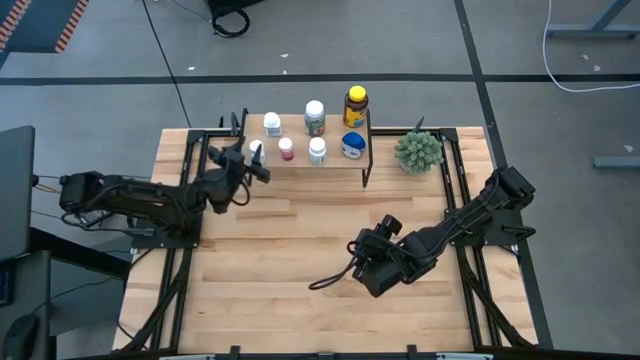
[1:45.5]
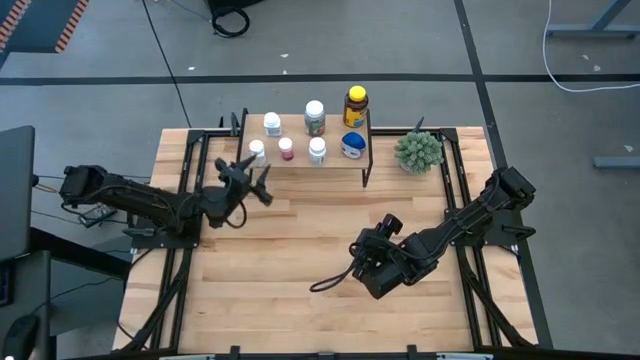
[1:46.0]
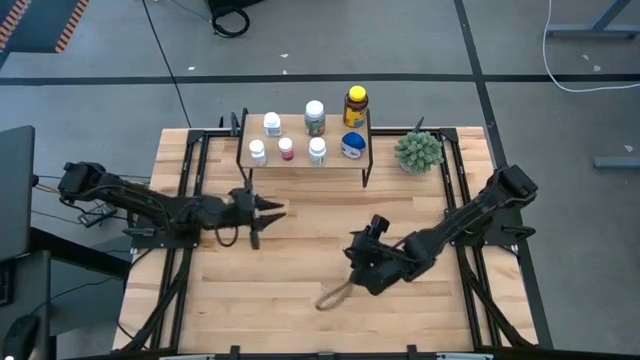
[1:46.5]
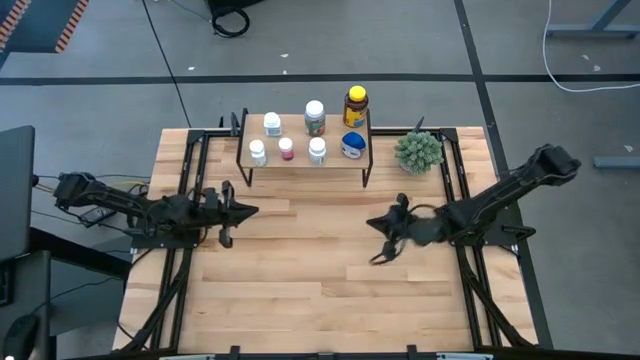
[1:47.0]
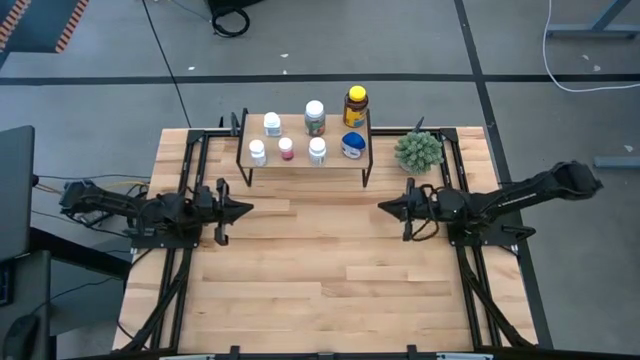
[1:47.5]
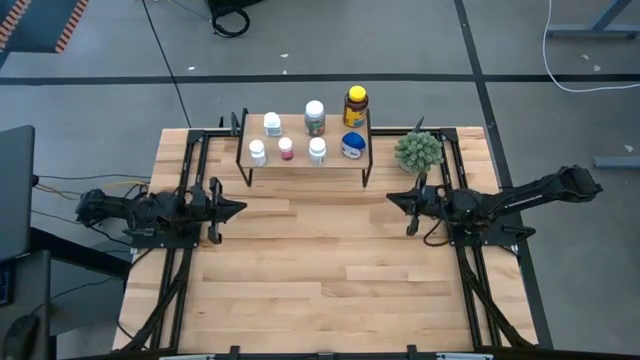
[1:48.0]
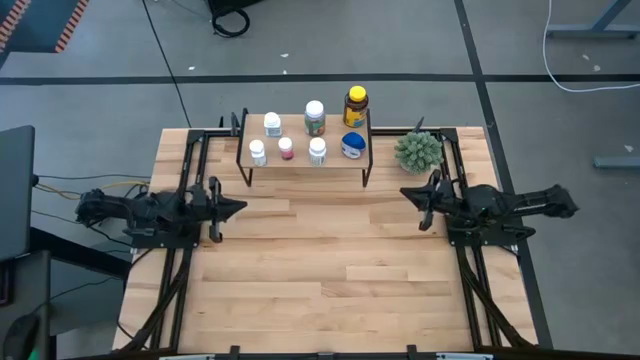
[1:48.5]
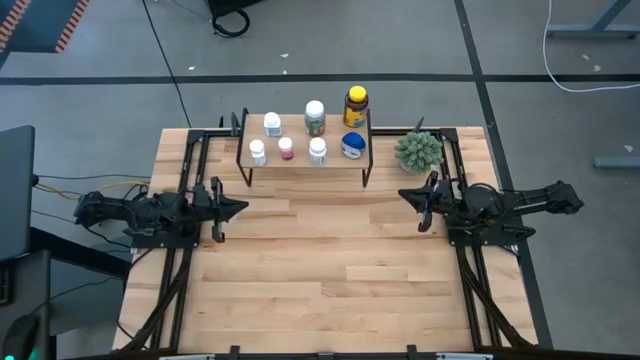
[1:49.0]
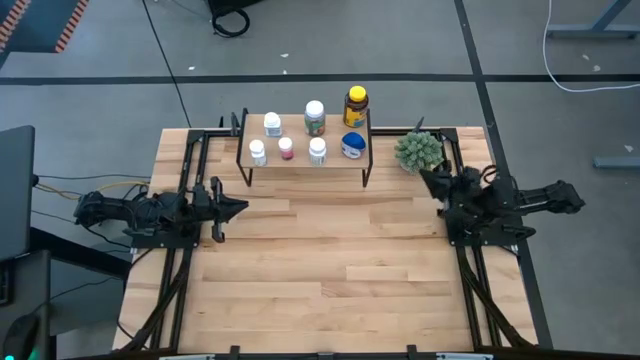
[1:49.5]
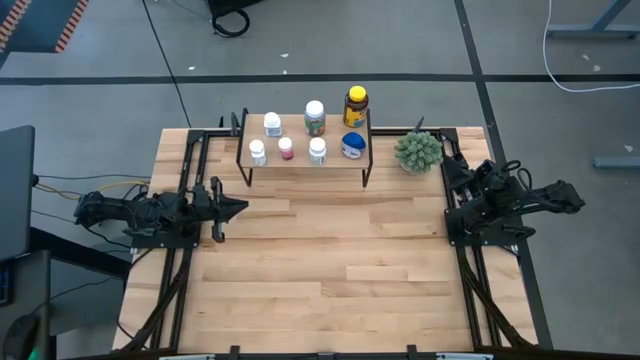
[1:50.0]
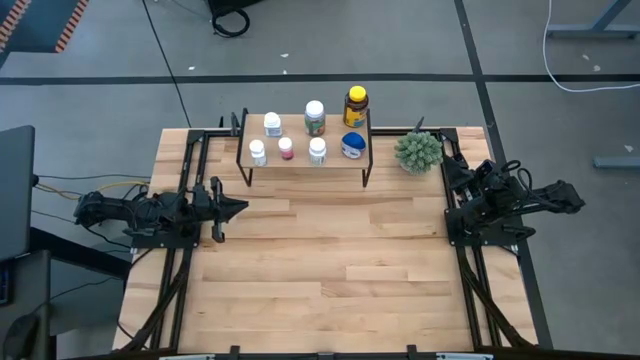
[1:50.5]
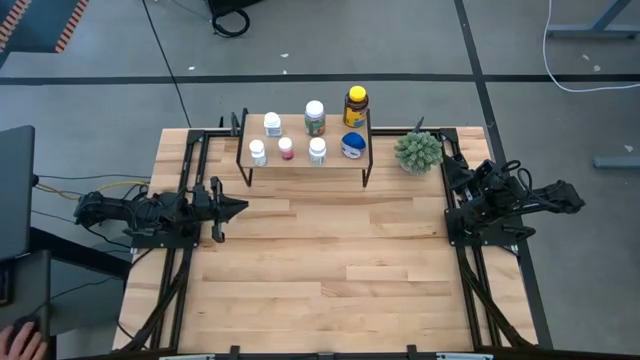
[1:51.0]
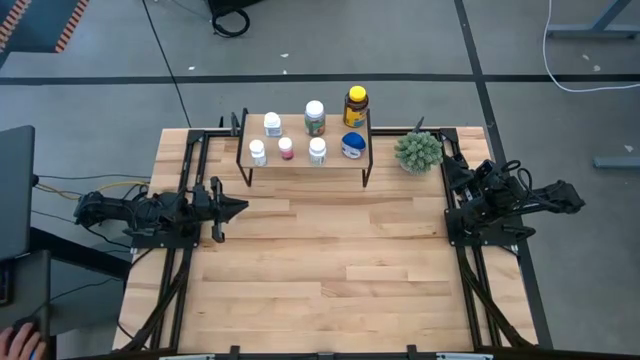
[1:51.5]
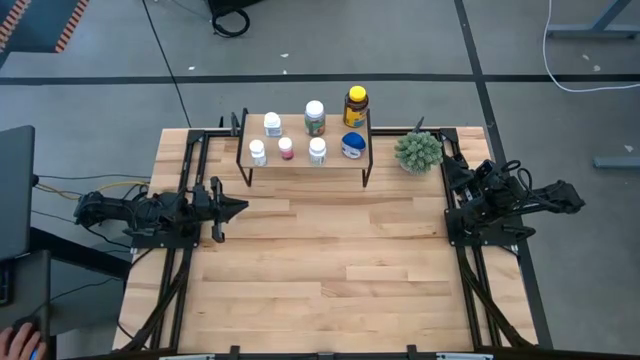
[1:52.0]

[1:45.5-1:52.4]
Task: Pick and place medicine bottles onto shelf by color
Return to Home Position

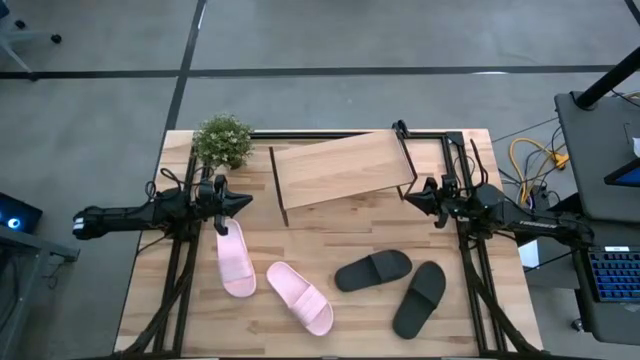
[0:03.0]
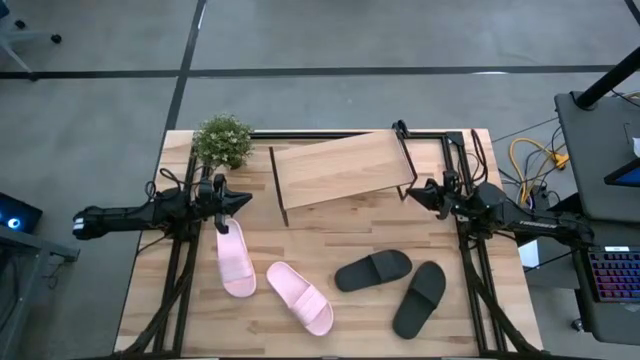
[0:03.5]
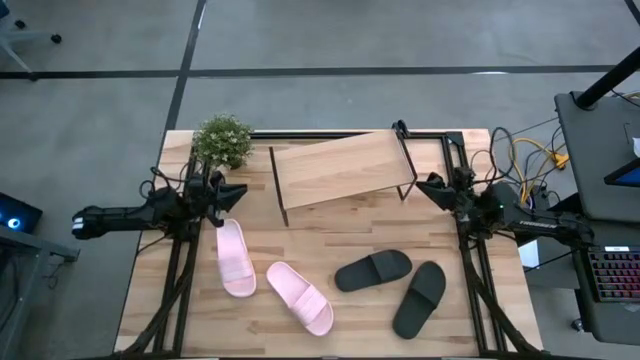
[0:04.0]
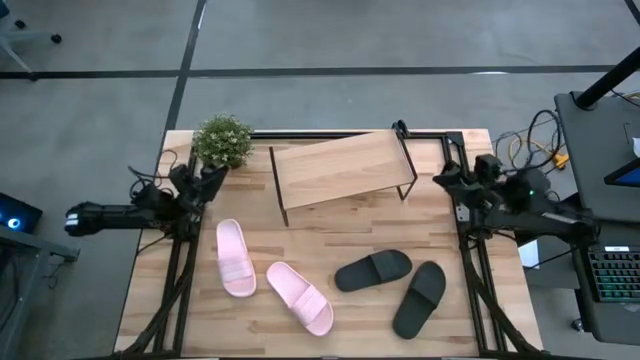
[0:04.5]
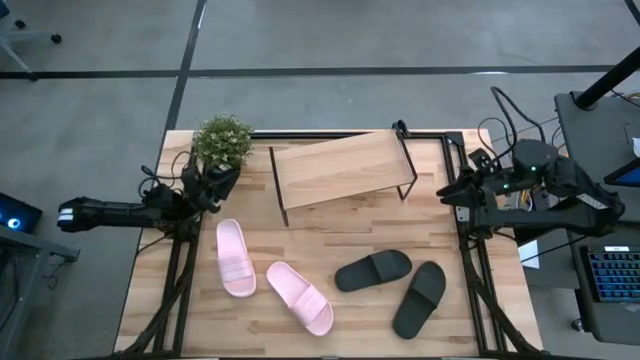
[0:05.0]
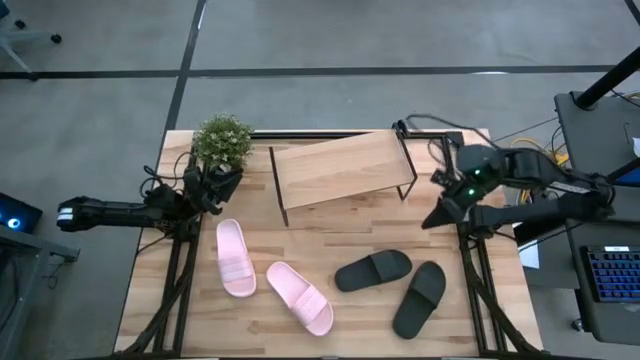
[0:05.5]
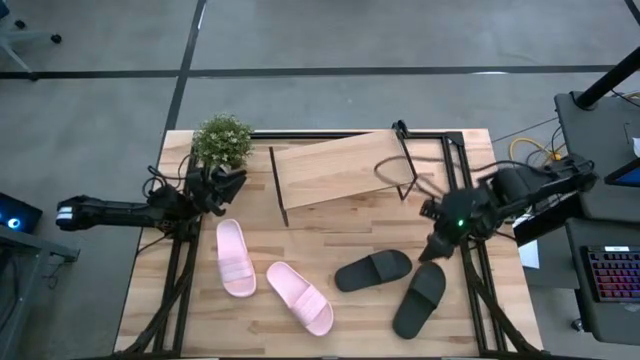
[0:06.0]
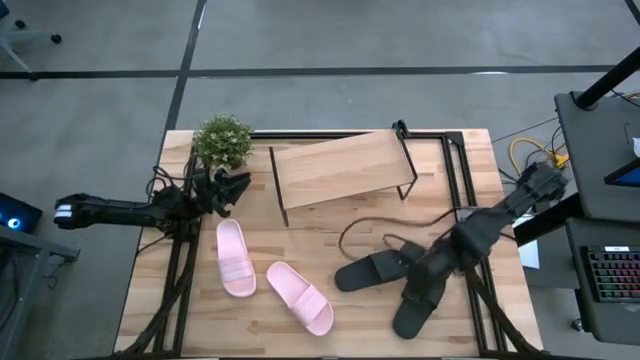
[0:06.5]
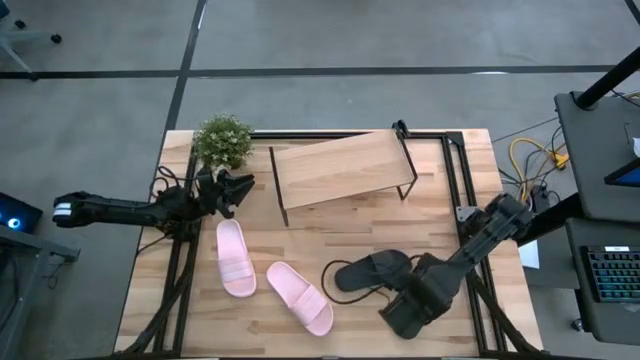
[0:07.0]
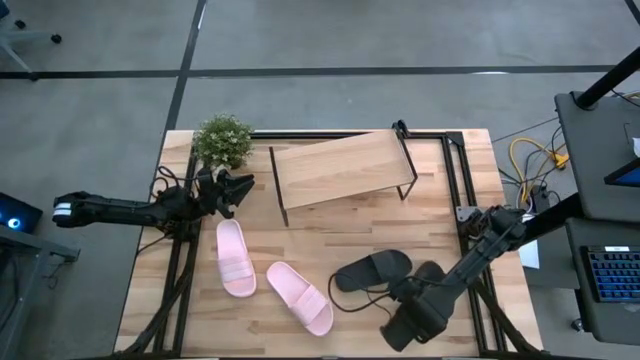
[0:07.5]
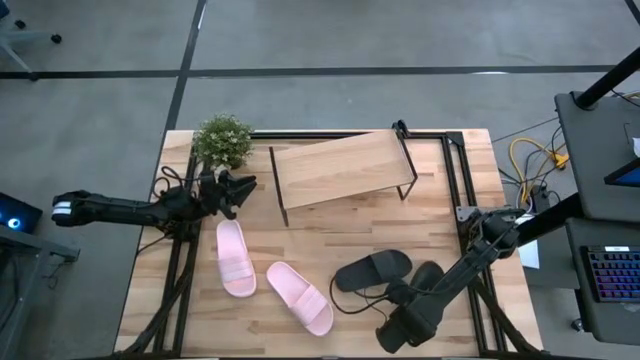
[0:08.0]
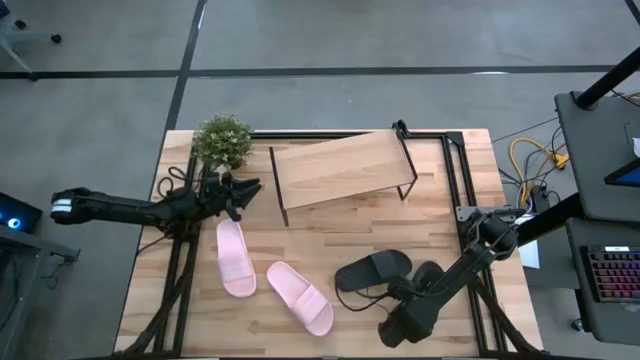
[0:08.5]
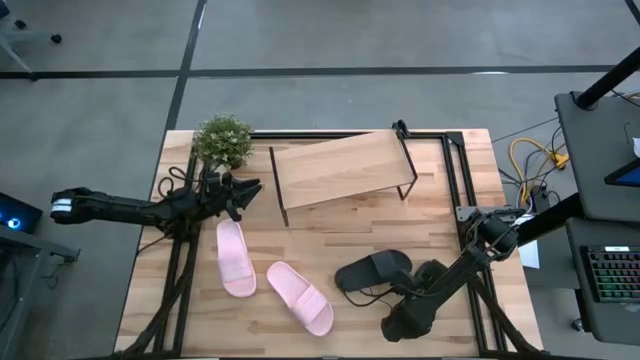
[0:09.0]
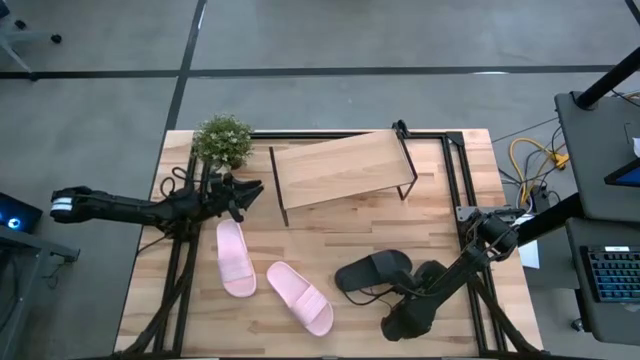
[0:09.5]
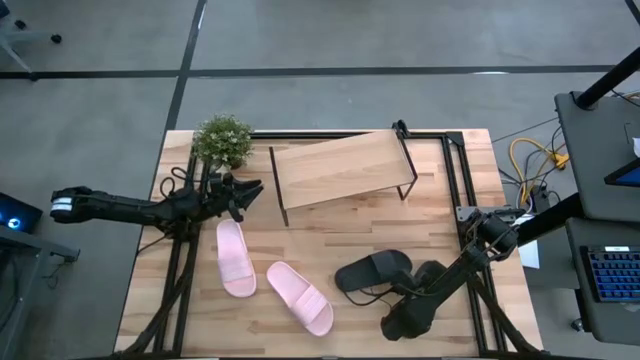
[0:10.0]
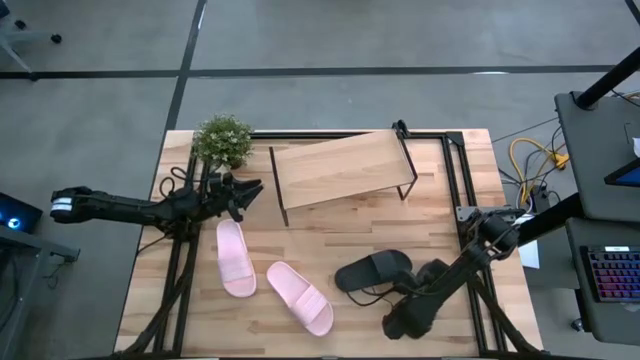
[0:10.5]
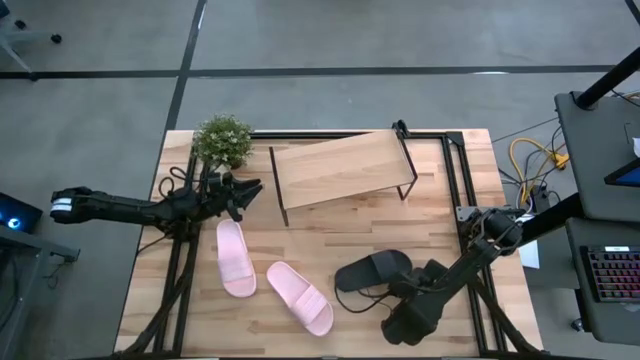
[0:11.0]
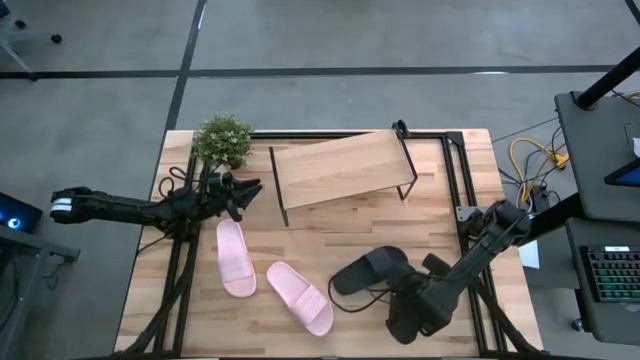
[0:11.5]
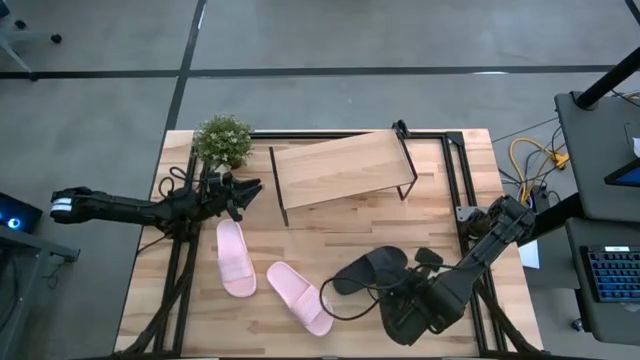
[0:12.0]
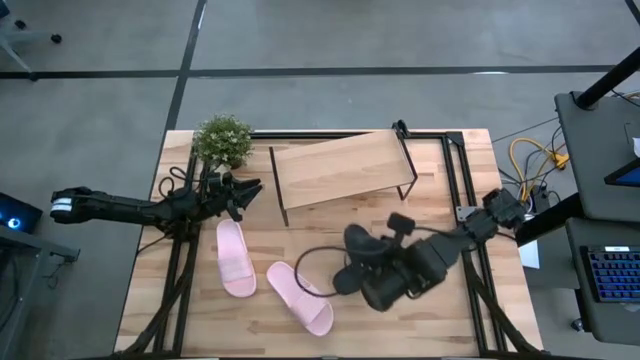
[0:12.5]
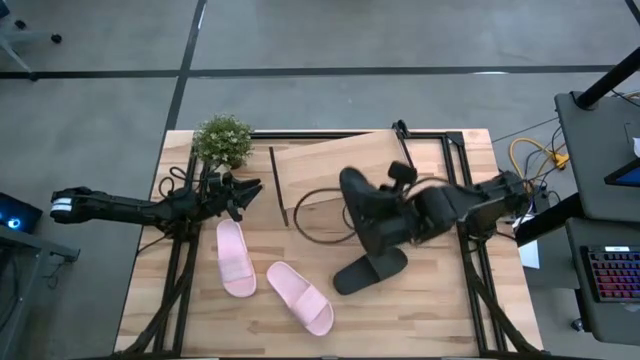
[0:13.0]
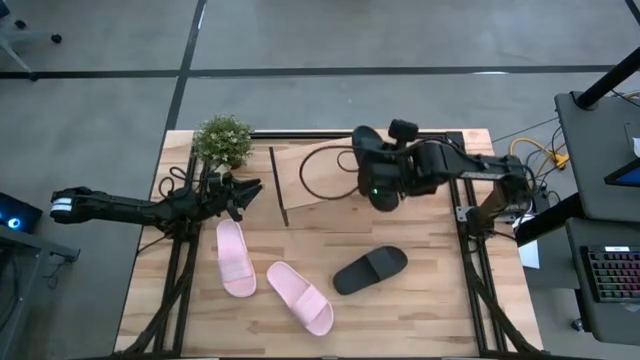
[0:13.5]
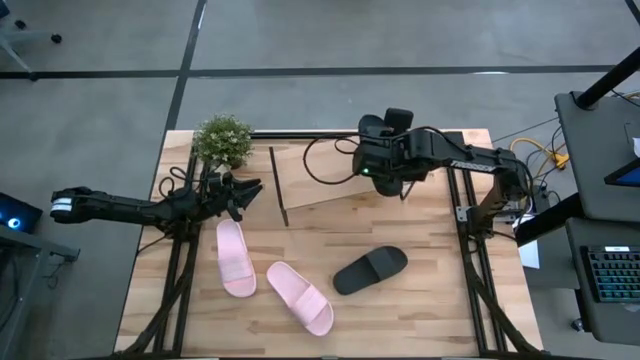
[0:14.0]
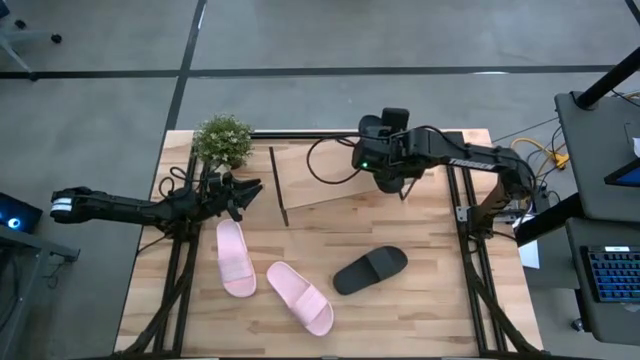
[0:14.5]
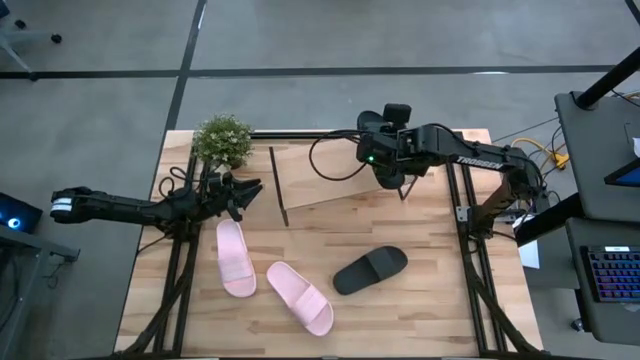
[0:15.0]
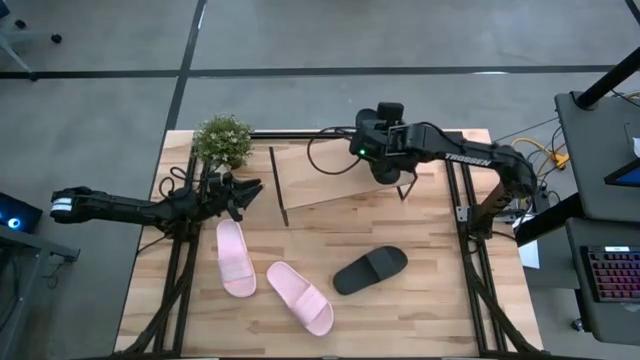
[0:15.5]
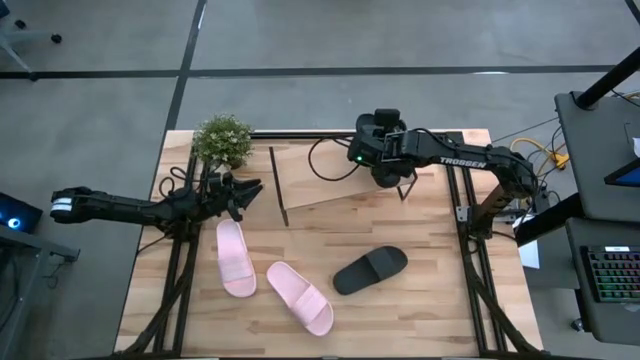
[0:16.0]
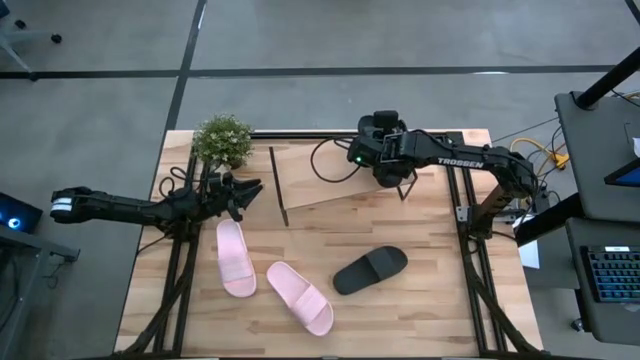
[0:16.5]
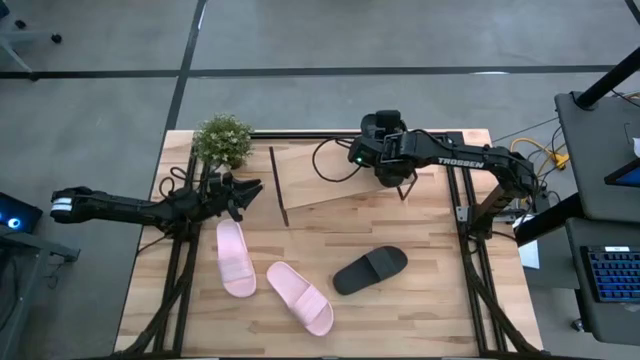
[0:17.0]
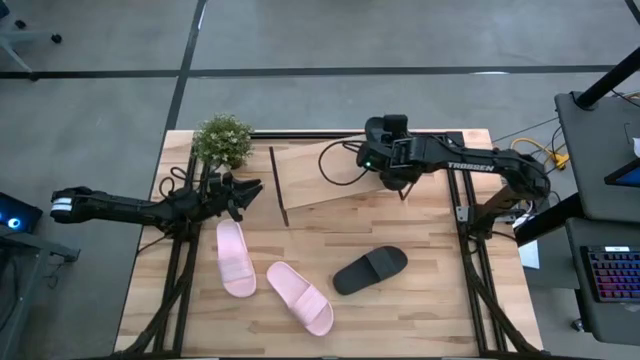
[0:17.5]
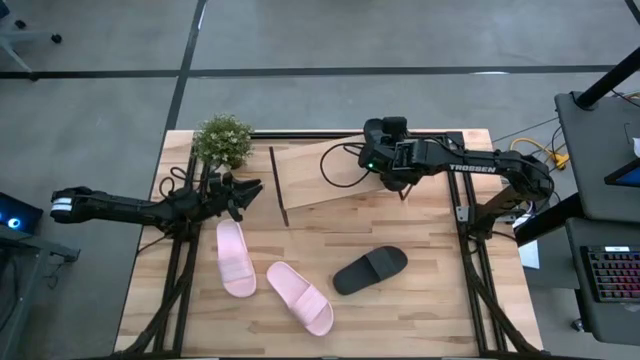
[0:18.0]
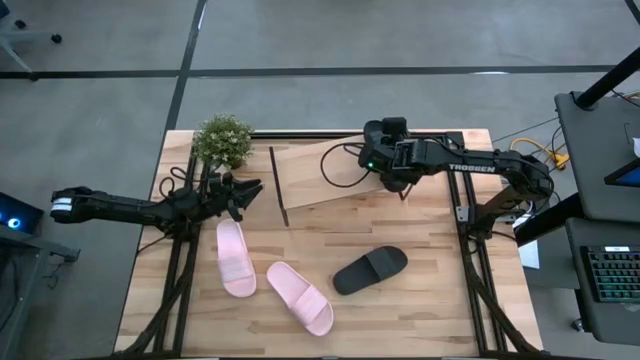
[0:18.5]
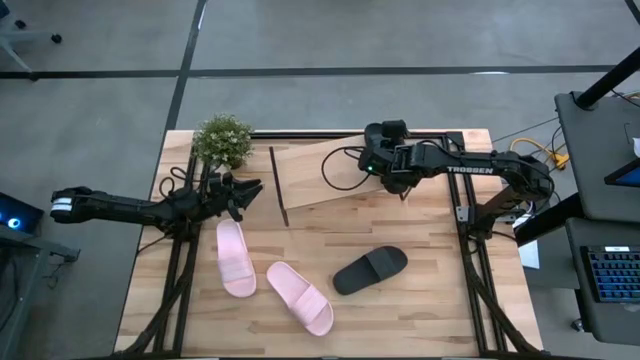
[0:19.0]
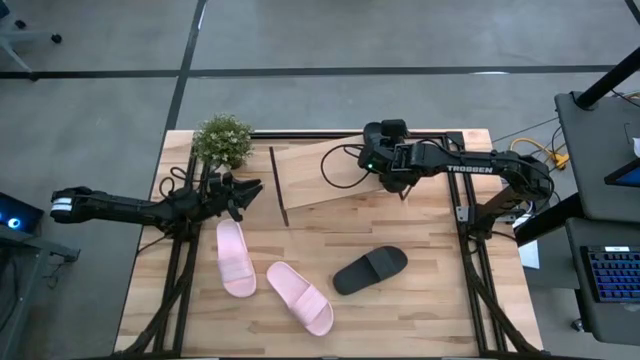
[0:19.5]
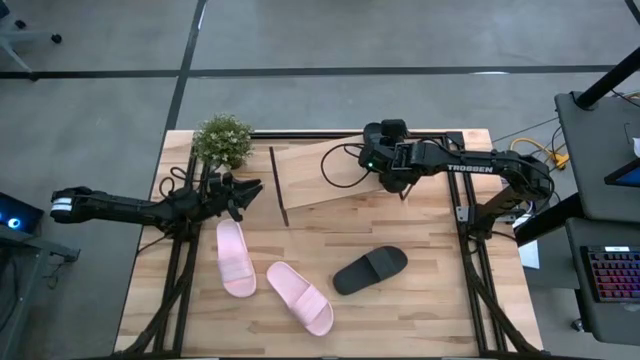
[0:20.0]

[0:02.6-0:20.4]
Task: Pick and place slides into the shelf
Put the right black slipper on the shelf
